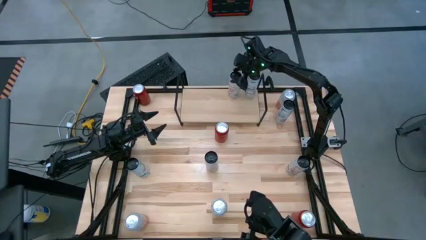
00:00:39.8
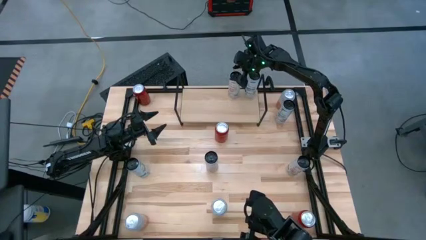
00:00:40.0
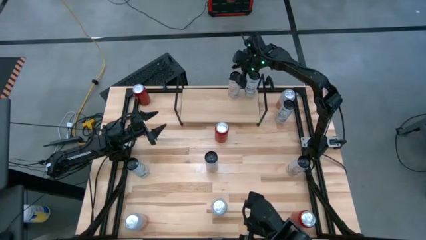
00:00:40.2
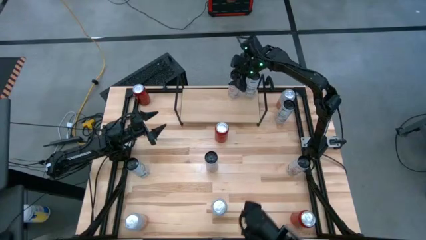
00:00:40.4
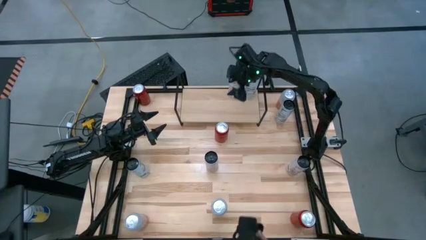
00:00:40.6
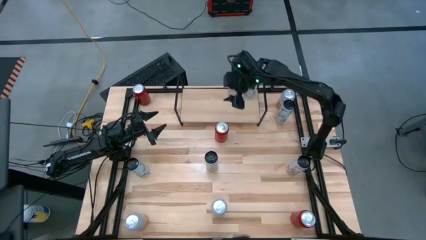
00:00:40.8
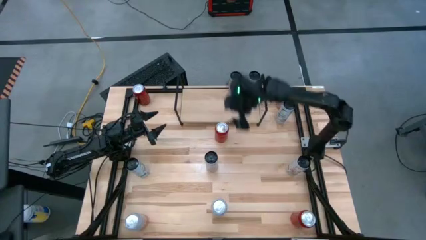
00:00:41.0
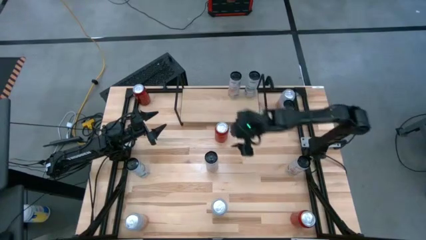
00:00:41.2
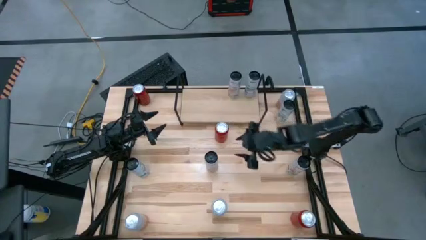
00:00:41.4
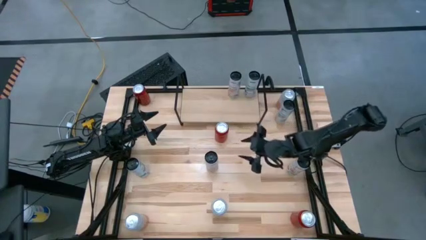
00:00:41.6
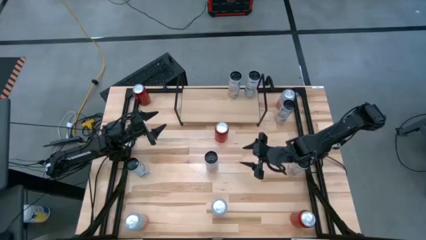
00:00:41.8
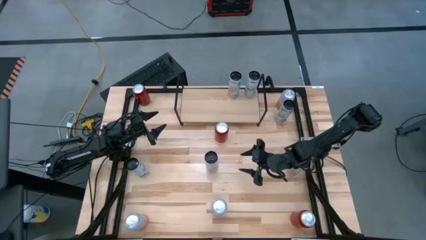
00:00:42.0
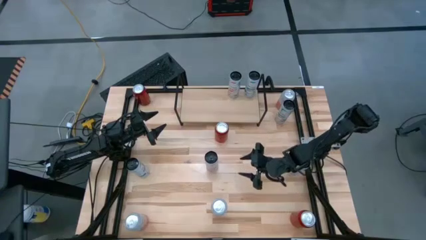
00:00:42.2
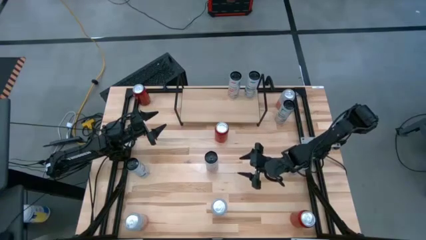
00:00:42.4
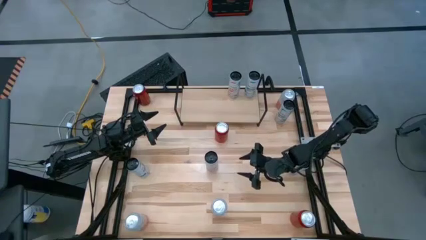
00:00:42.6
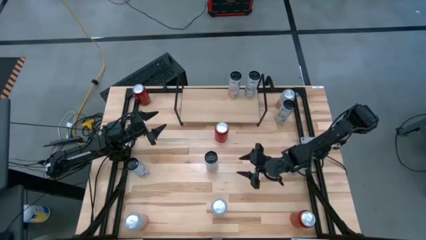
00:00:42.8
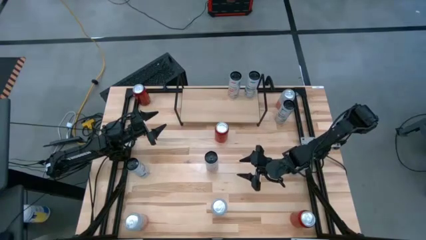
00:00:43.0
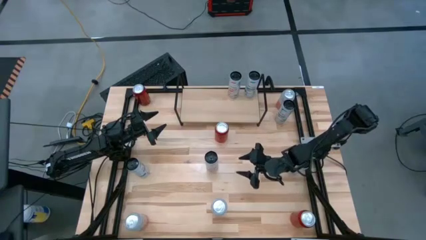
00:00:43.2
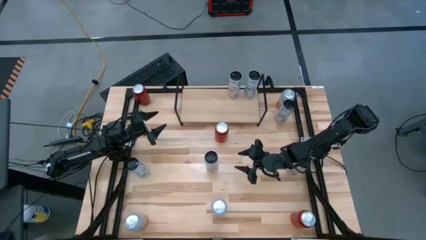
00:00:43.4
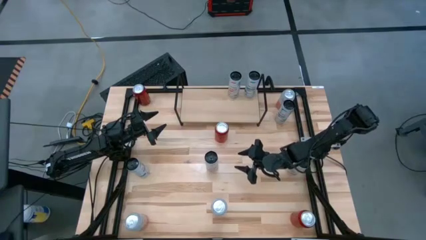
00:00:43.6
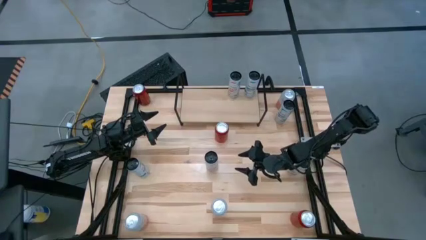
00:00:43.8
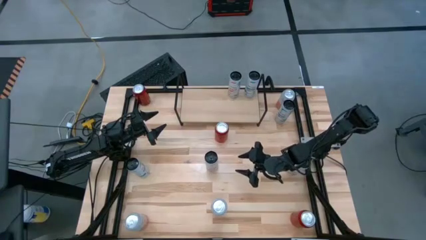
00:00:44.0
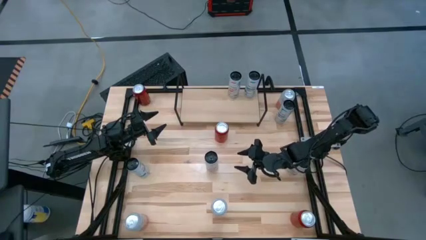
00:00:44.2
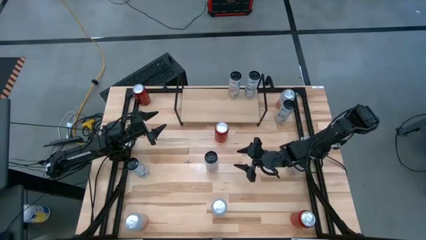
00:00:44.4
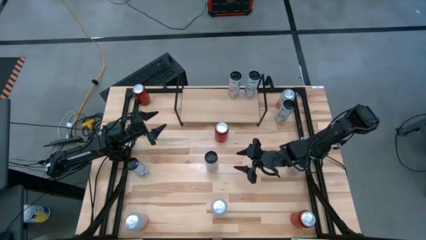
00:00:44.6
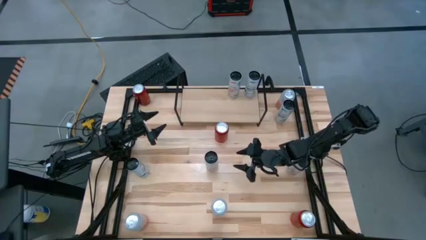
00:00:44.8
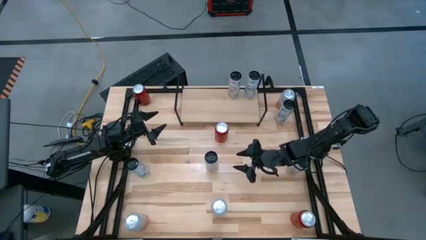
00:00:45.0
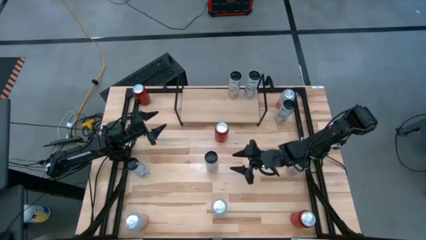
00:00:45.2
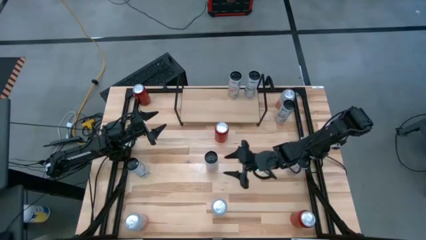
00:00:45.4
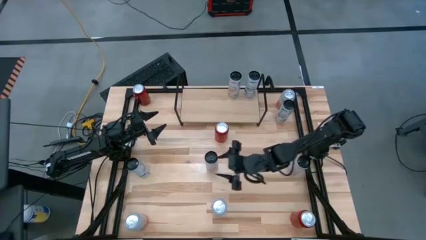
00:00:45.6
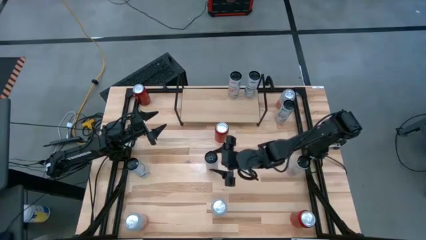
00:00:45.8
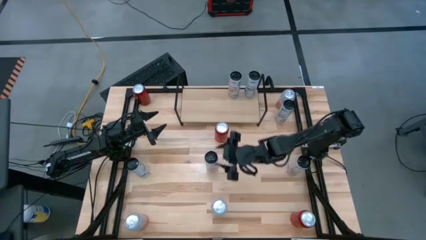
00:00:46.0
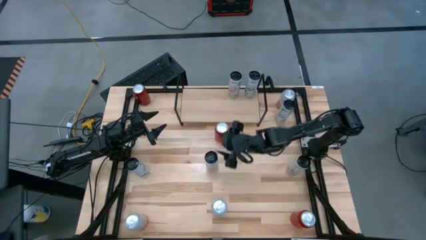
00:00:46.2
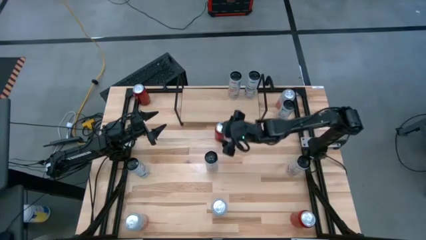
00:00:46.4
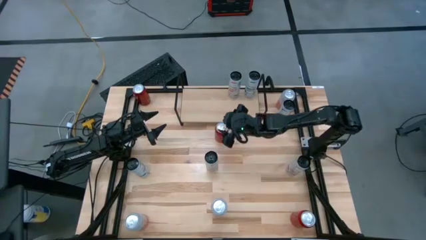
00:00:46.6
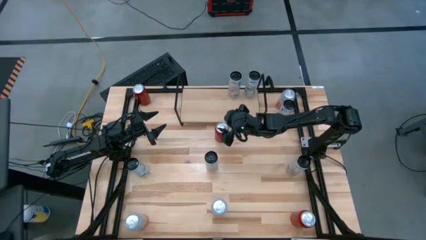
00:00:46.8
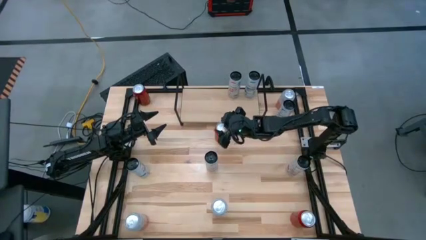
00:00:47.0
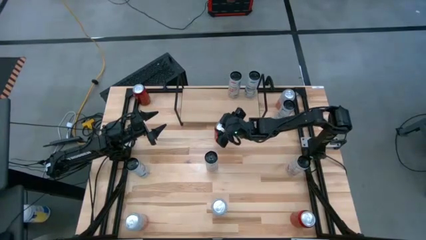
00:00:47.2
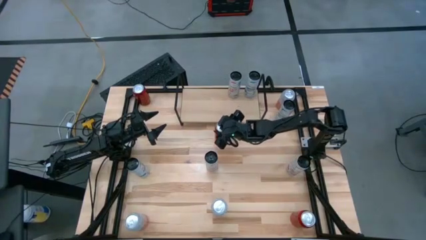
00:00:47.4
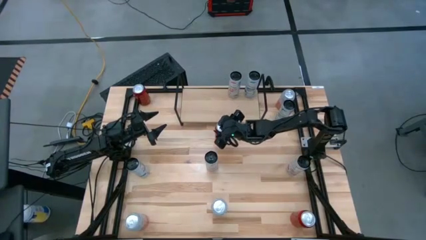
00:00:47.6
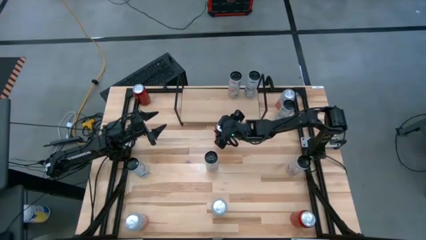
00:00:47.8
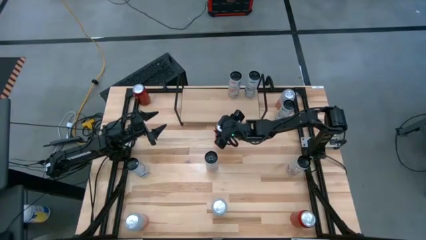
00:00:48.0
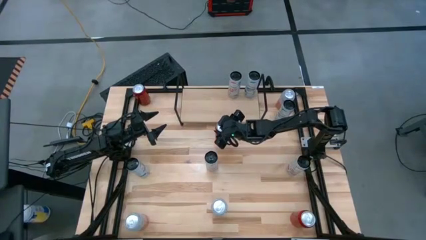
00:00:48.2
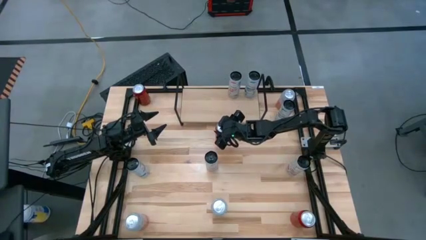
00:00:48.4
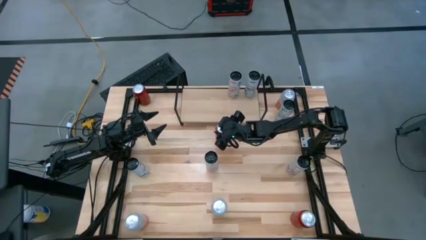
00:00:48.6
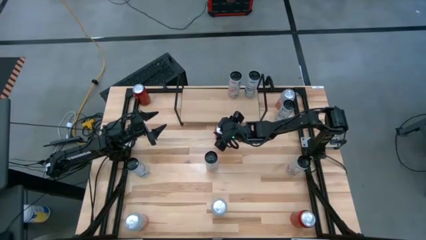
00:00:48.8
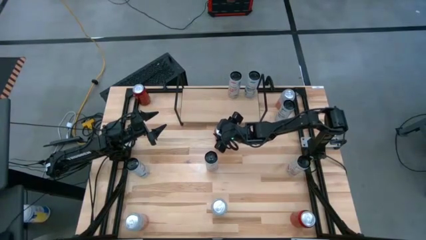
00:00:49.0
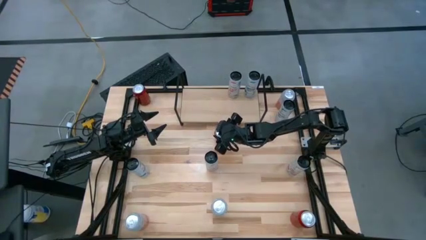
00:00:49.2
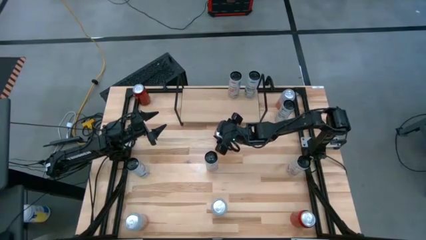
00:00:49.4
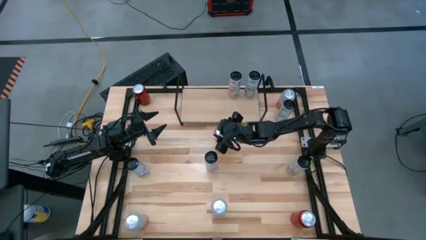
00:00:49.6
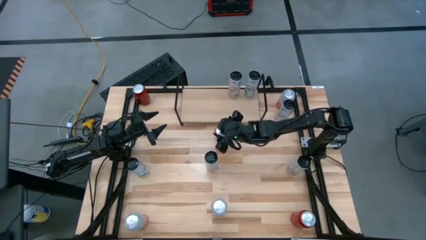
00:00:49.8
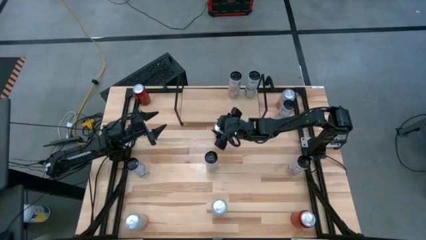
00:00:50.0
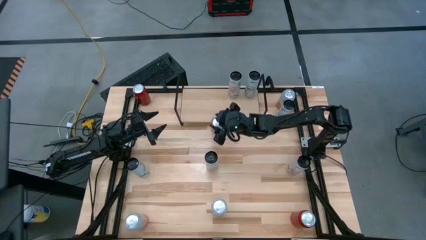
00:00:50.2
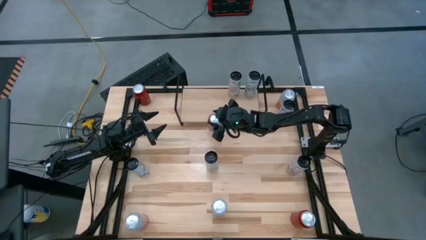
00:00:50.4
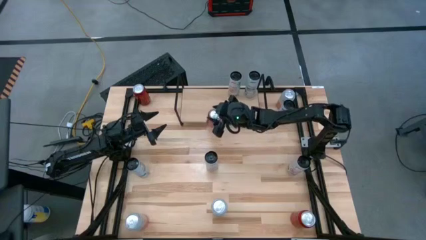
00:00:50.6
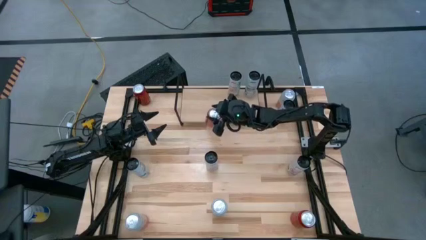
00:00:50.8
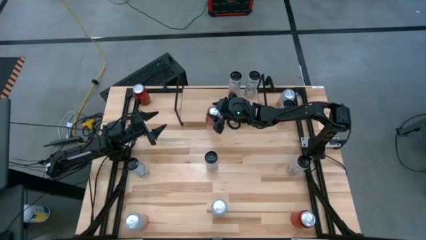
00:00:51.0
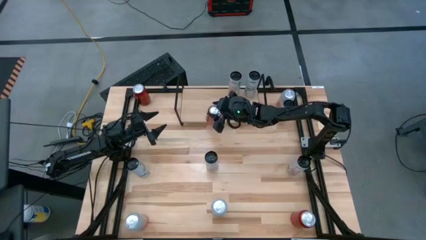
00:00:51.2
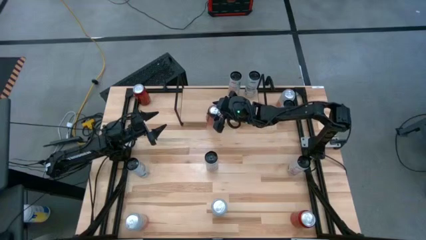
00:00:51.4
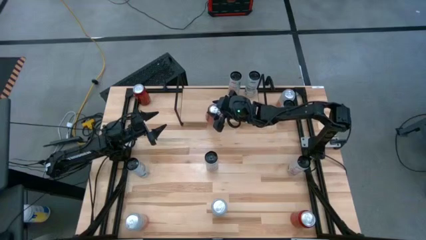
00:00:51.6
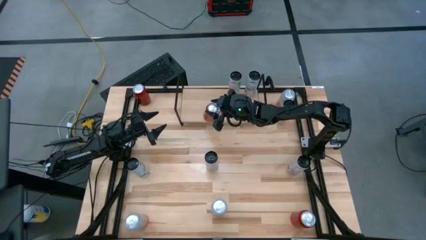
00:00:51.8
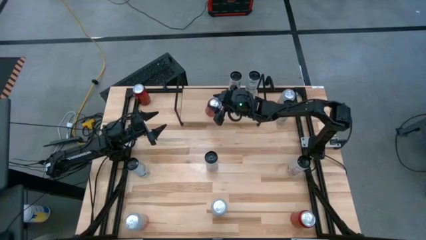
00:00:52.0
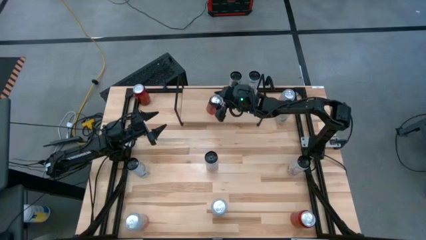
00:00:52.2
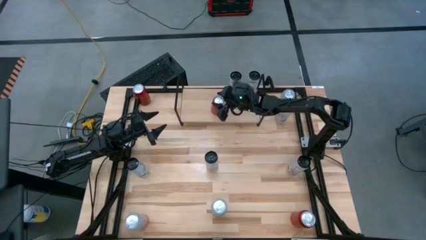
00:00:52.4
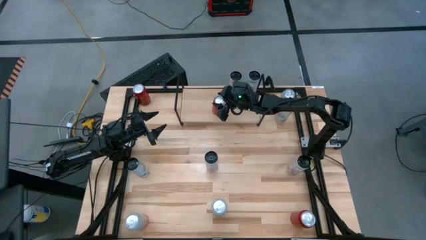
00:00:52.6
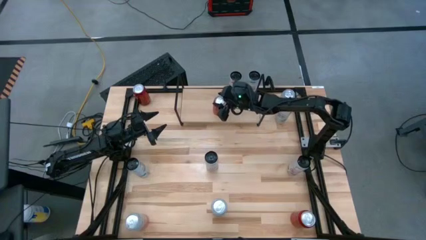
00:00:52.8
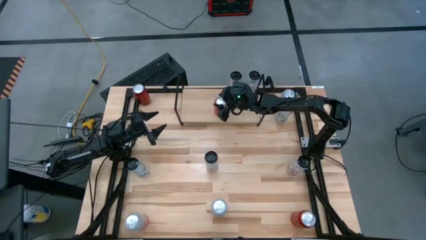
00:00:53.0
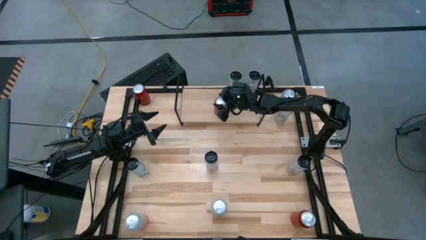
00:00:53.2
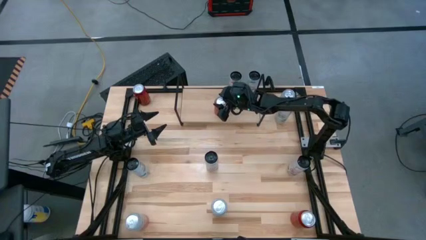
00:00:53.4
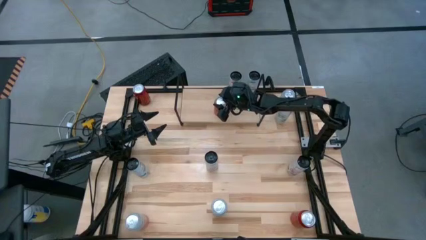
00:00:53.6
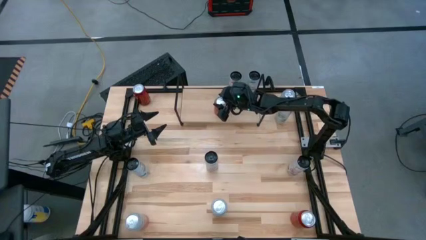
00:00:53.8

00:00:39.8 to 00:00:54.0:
Task: Place canned beverage on shelf
Put the middle red black soda can on the shelf

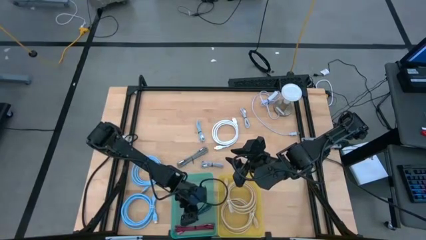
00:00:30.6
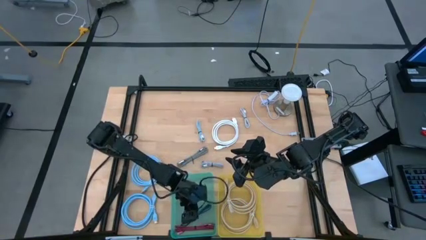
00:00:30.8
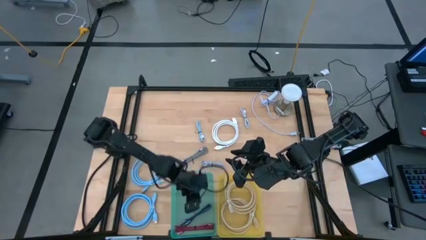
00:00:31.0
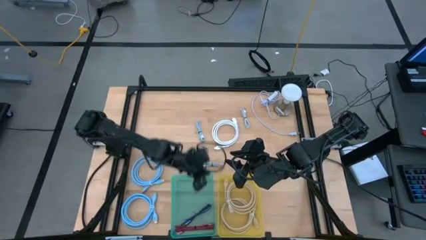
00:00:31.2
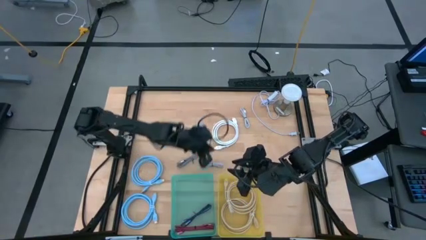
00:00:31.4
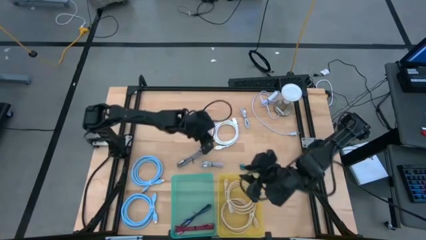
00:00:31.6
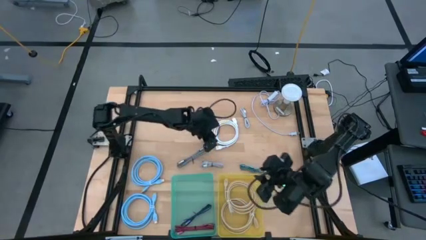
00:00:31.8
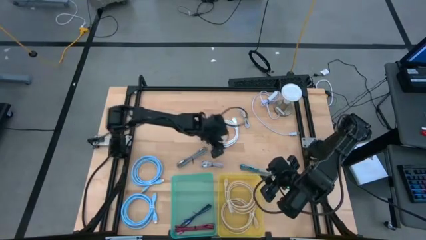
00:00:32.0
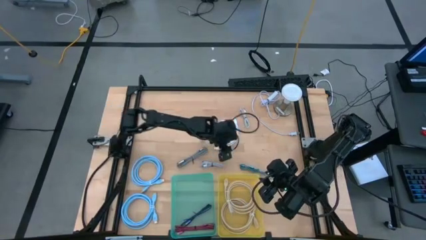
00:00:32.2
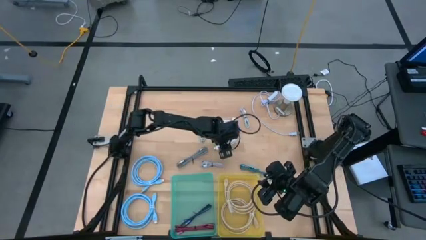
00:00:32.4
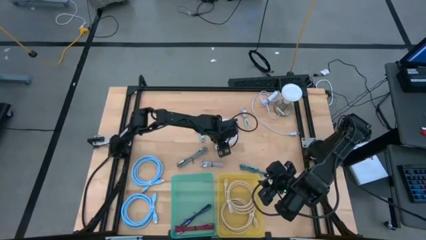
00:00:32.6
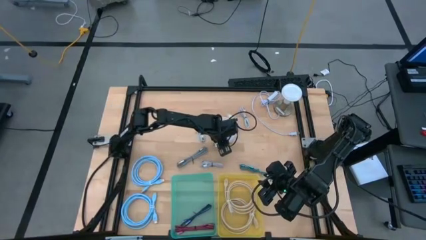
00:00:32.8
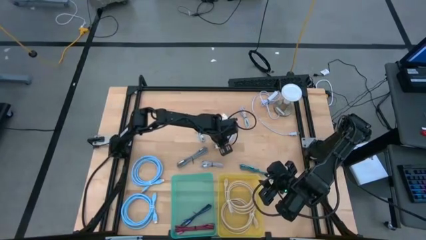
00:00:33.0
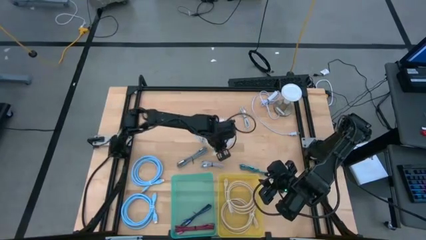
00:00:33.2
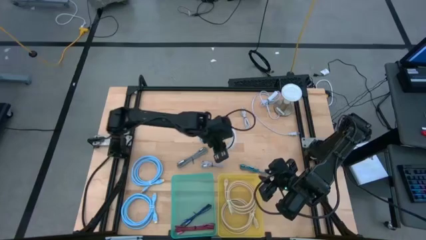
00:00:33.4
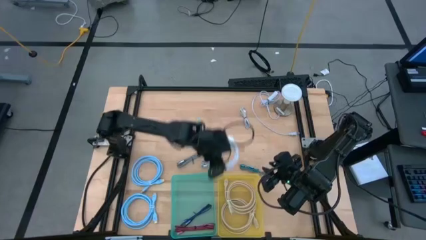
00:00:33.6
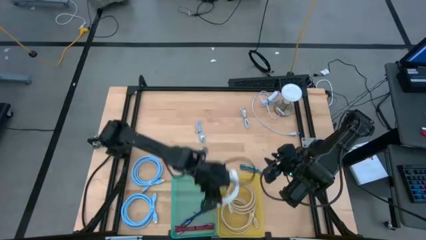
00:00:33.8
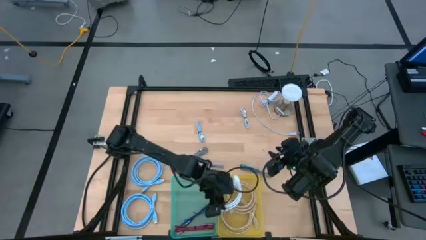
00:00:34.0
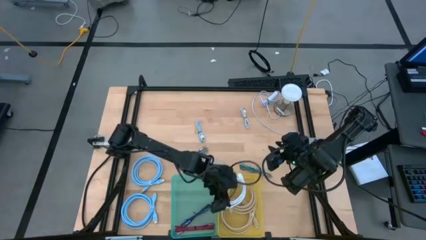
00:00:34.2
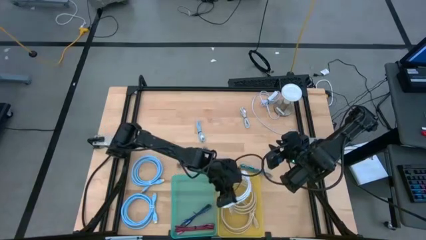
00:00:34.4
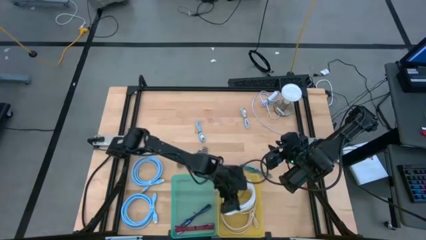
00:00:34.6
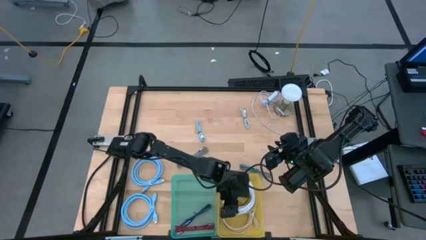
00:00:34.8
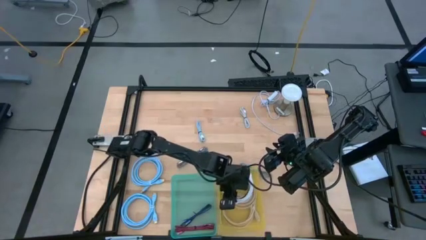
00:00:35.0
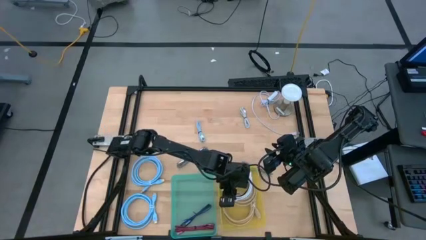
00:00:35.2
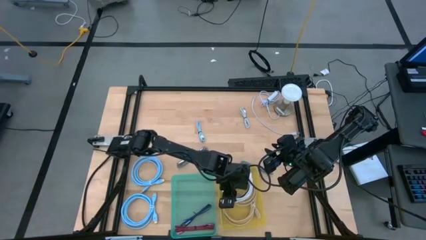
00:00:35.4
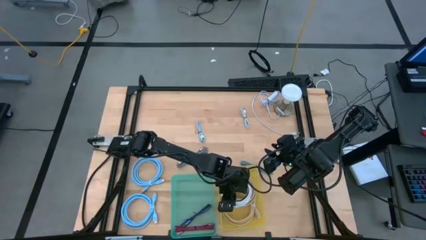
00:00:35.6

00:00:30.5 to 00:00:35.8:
Task: Pick & Place USB Port
Put the white HDMI cable into the yellow bin
